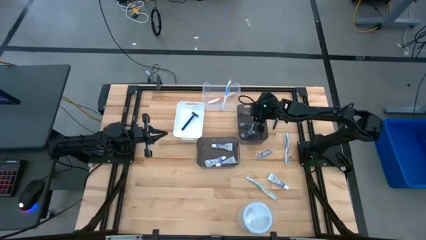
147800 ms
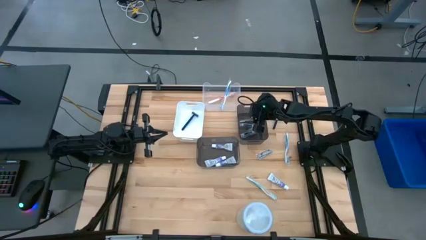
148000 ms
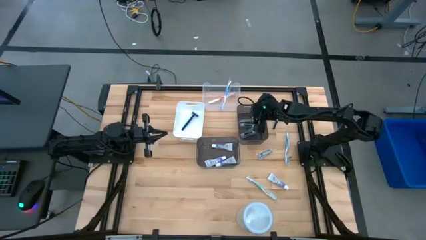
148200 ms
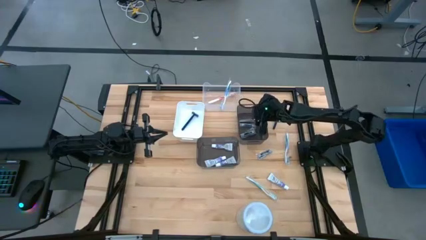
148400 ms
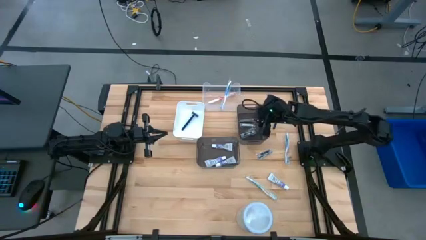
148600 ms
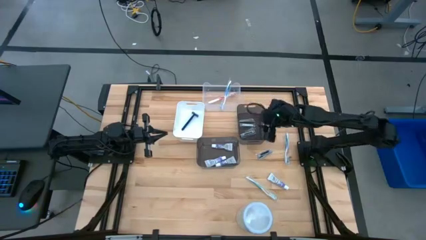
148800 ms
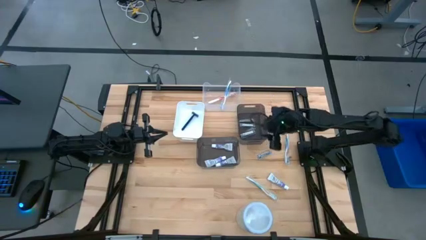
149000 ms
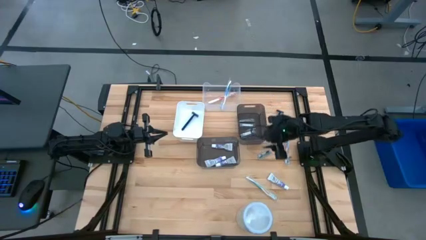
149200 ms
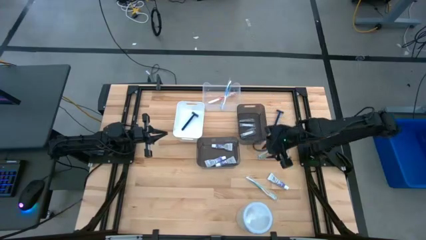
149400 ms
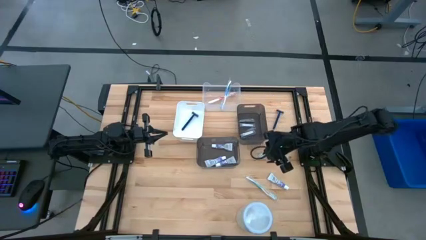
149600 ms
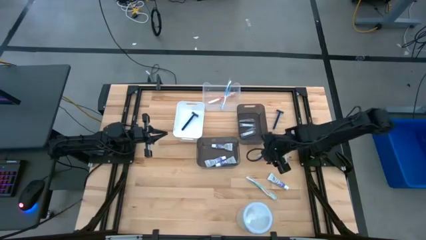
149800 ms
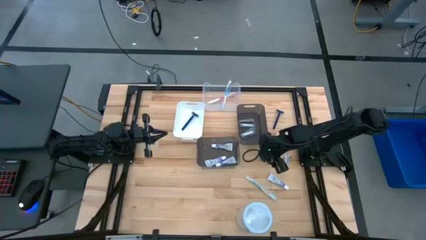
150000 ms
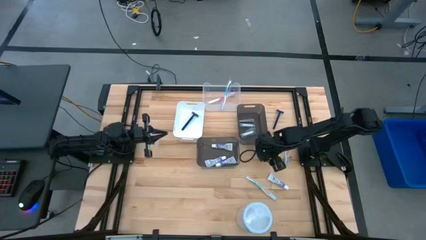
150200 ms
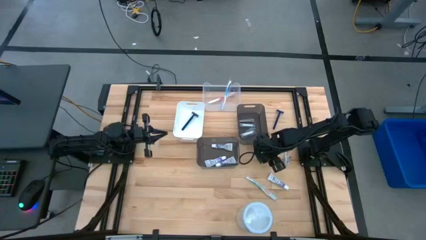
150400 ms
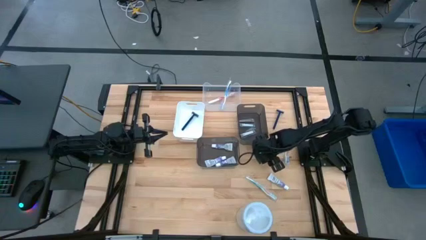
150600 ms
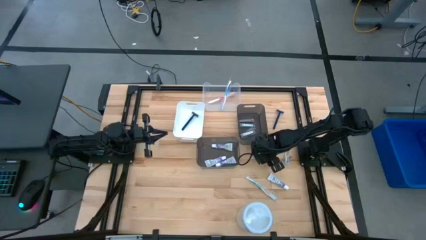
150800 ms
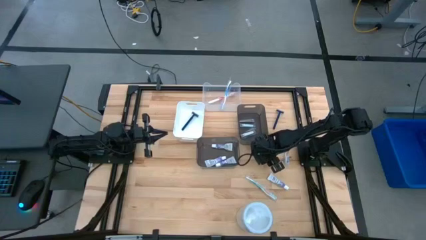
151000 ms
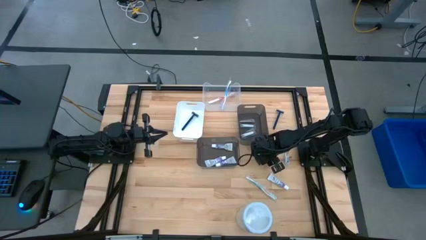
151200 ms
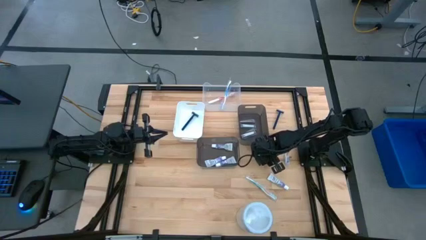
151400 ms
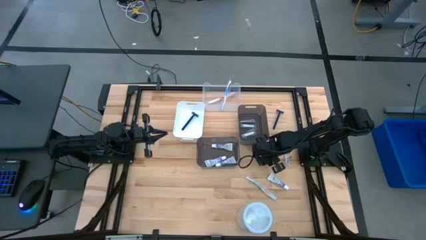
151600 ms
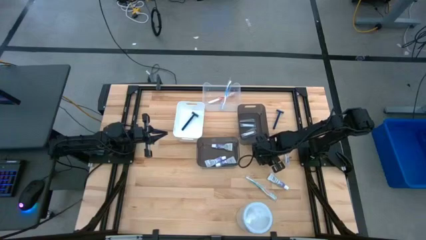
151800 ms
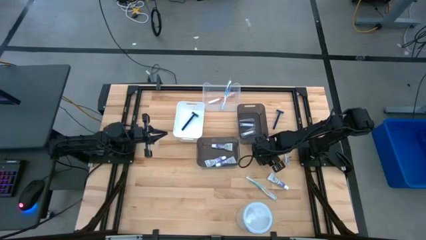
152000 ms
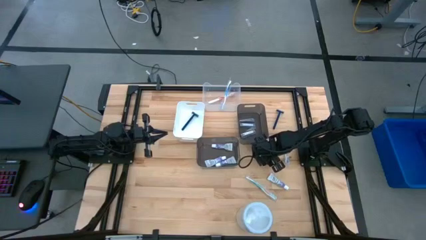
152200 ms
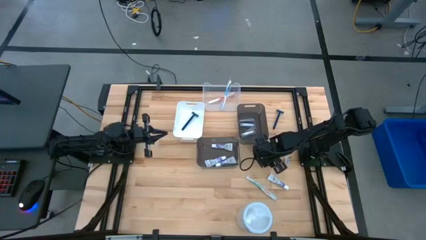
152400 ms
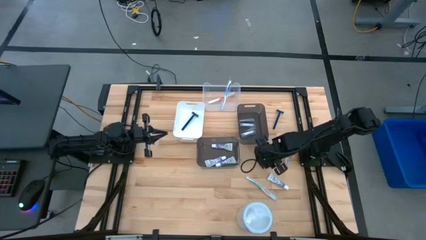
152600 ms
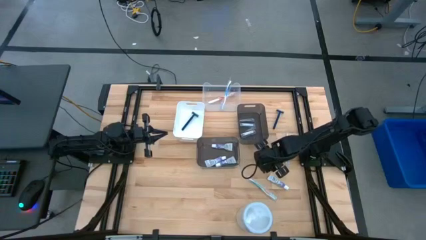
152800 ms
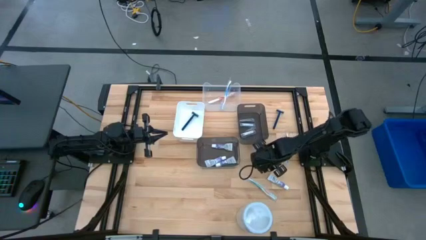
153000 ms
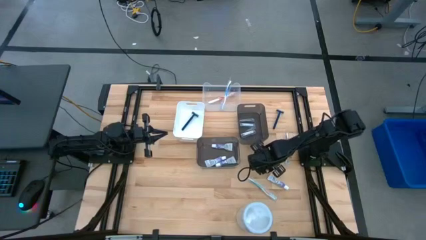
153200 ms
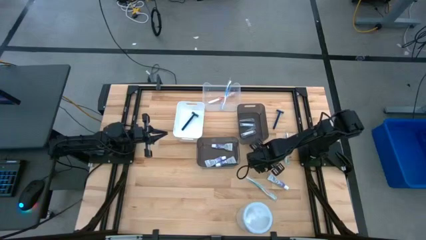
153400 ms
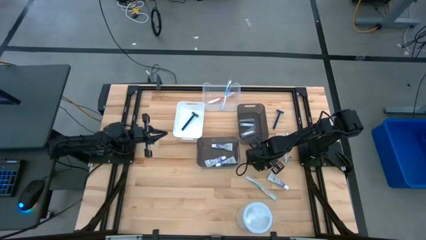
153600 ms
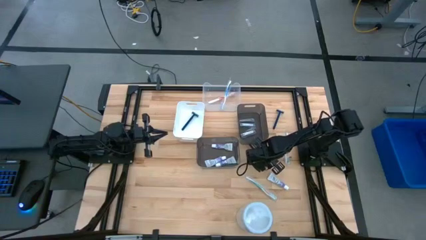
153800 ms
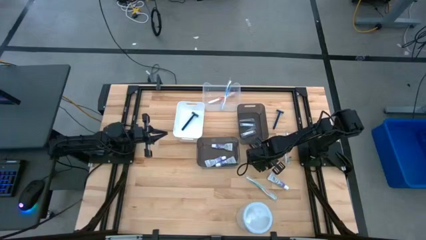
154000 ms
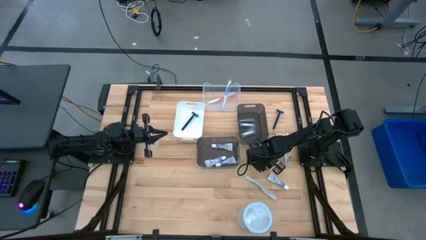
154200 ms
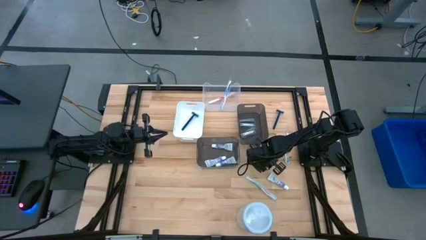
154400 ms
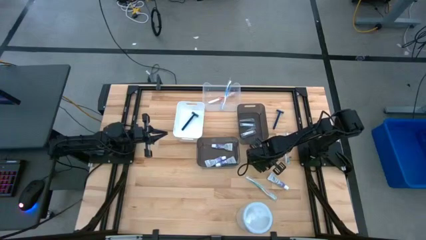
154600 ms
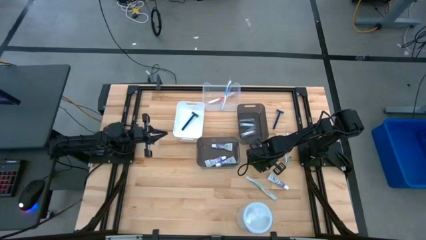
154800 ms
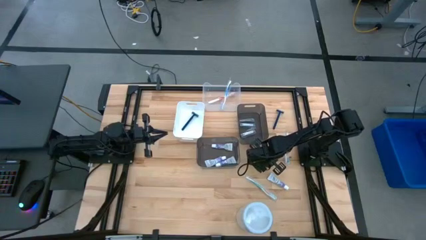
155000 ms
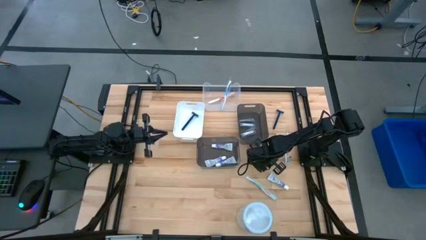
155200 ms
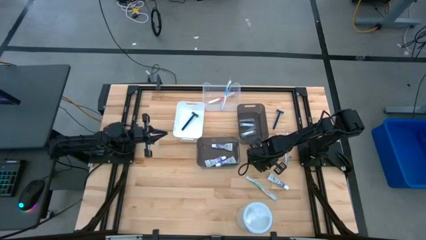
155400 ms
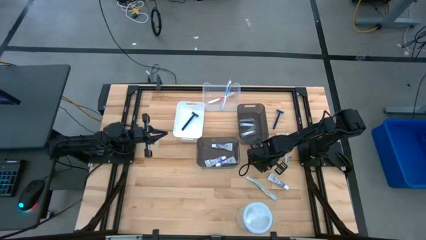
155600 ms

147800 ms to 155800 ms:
Task: Pick & Place Travel size toiletries
Put the silver nail cutter into the top black bin

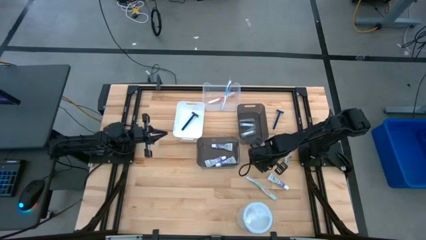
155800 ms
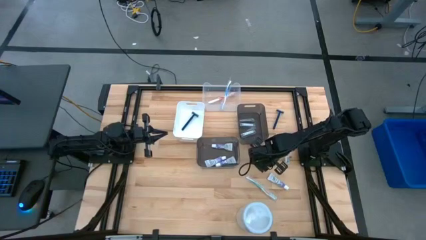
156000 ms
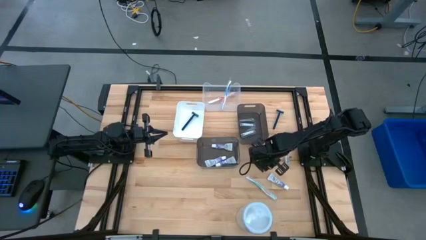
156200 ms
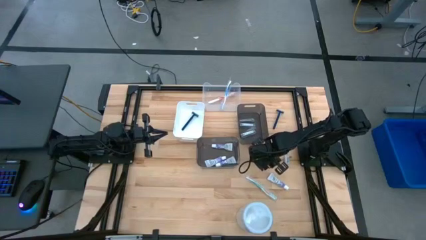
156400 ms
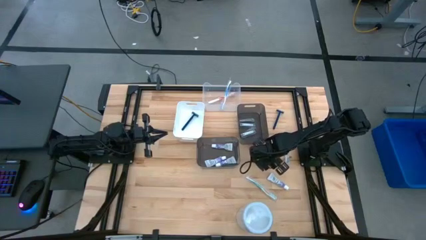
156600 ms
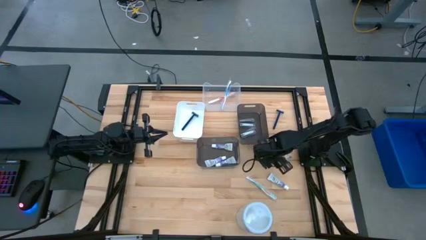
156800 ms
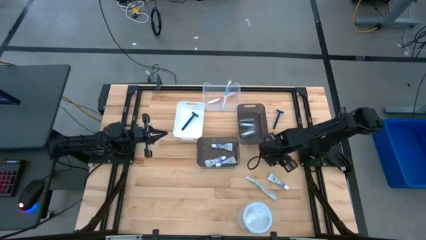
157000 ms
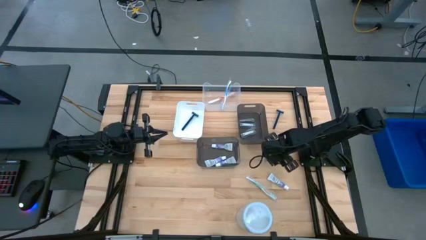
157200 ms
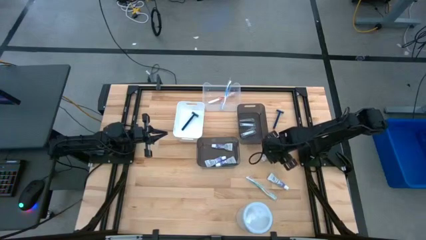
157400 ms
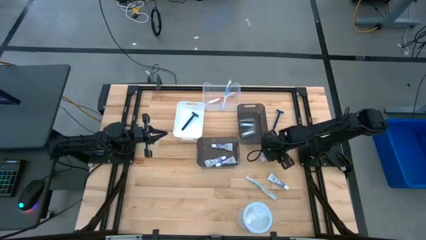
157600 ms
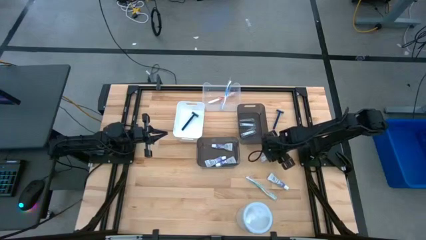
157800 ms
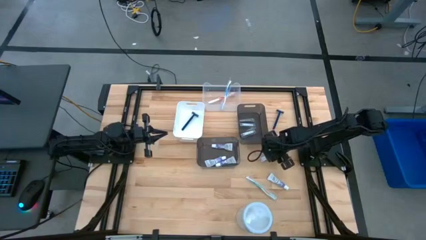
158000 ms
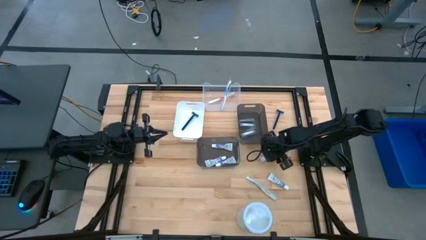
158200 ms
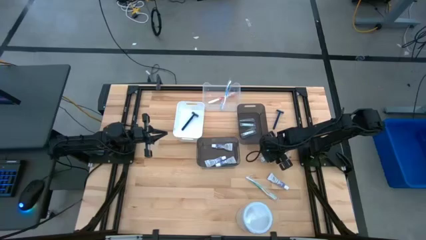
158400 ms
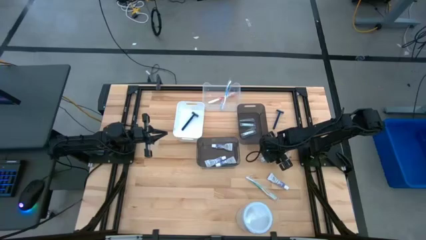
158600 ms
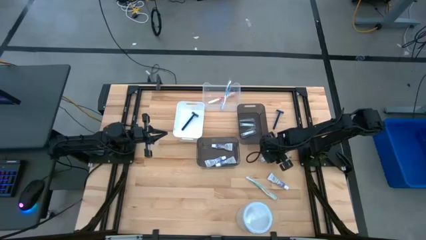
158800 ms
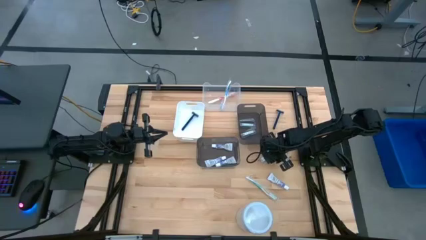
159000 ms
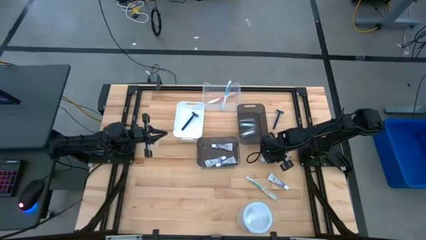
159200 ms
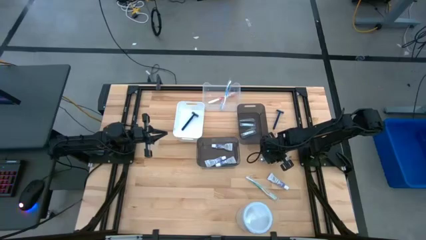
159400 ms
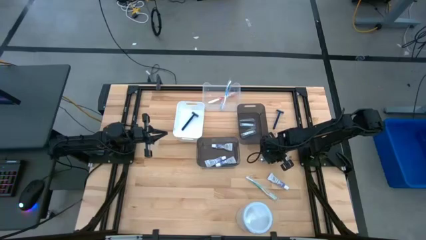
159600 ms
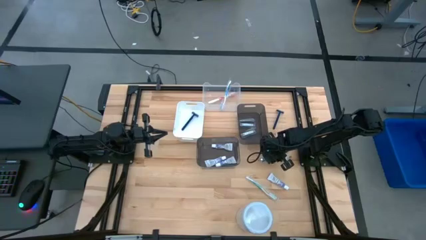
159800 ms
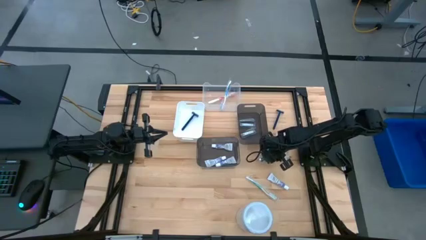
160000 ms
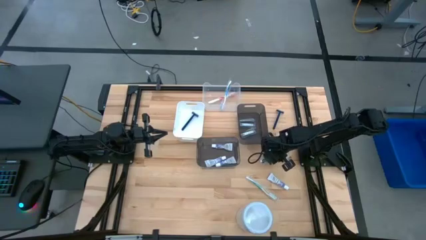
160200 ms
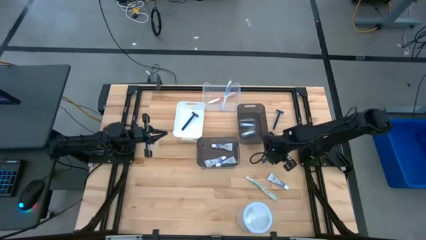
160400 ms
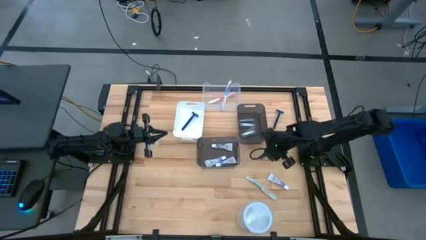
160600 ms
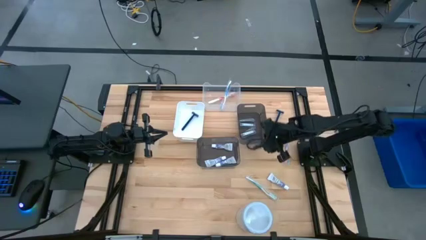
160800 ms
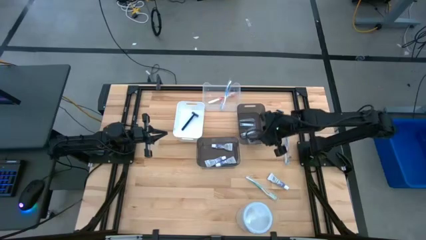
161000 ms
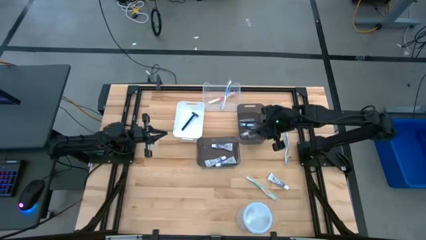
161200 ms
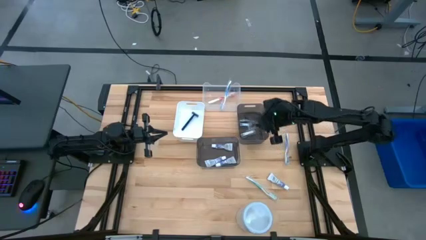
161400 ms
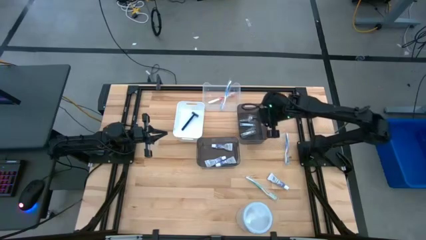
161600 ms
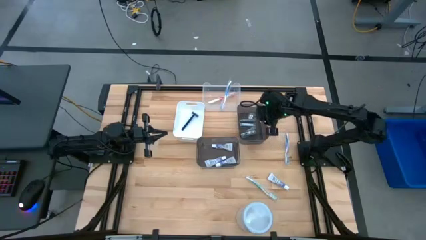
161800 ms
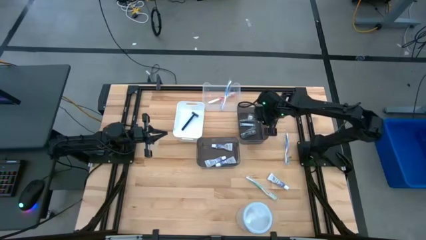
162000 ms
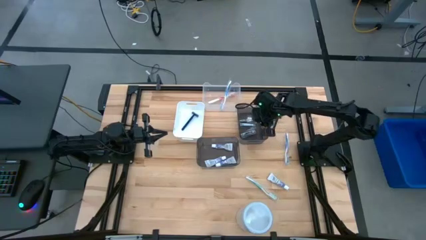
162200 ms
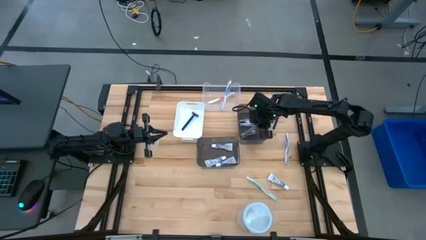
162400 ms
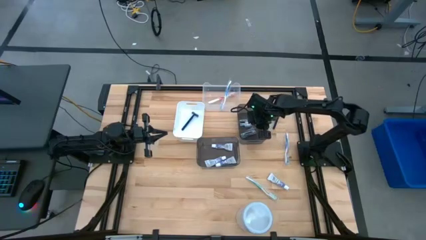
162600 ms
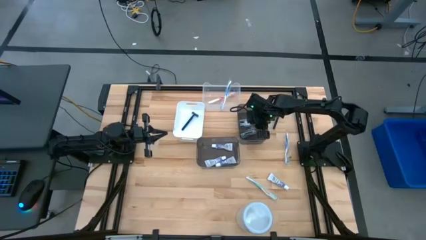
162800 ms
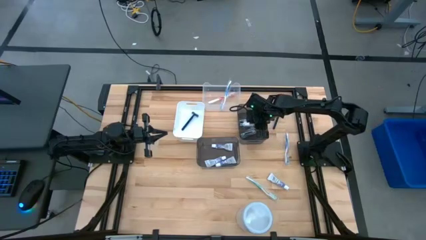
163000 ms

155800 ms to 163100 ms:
Put the silver nail cutter into the top black bin
